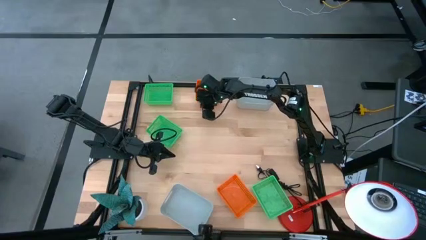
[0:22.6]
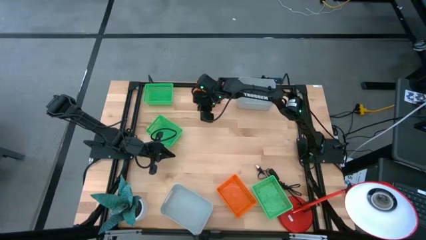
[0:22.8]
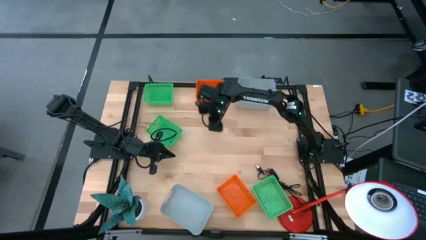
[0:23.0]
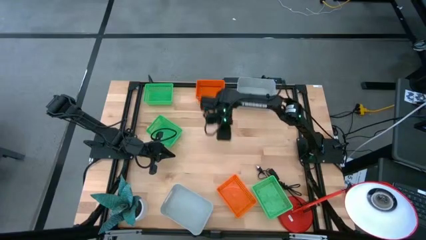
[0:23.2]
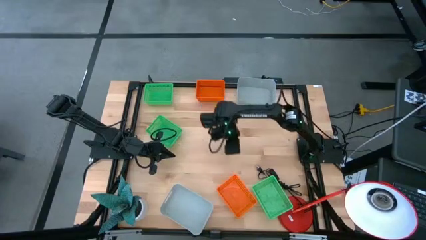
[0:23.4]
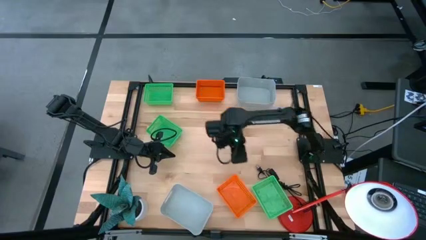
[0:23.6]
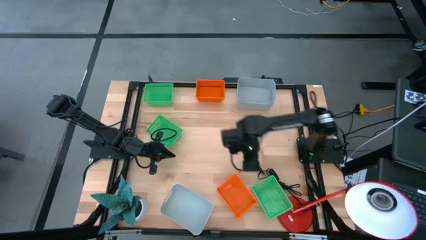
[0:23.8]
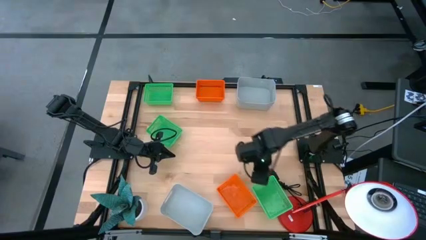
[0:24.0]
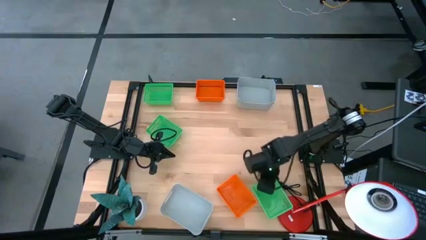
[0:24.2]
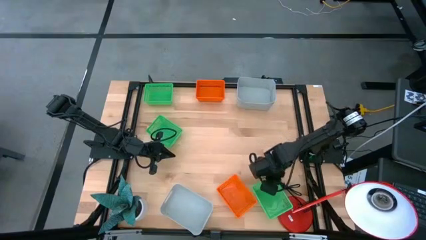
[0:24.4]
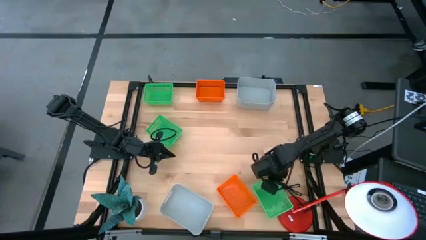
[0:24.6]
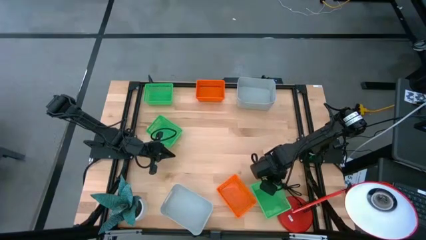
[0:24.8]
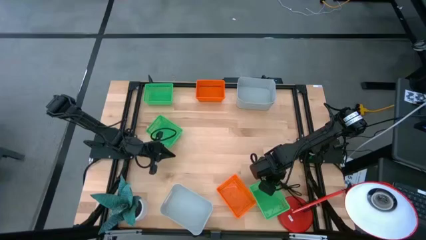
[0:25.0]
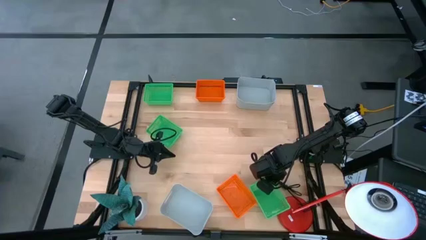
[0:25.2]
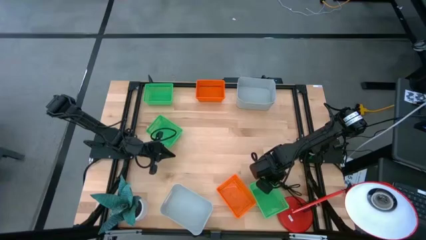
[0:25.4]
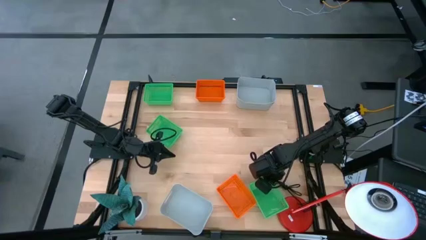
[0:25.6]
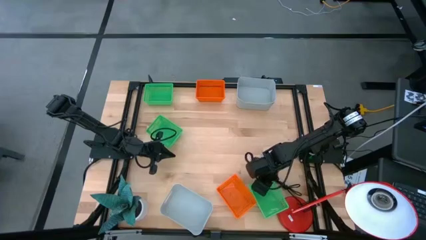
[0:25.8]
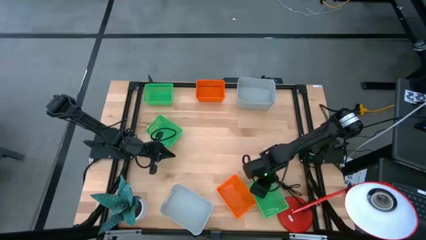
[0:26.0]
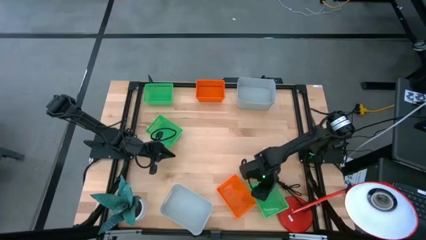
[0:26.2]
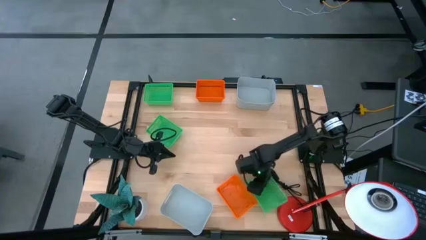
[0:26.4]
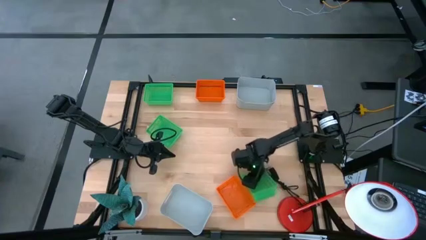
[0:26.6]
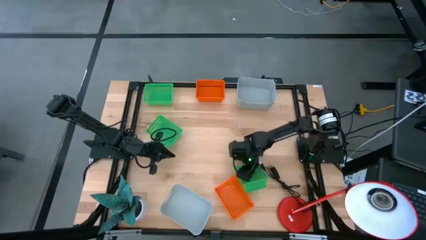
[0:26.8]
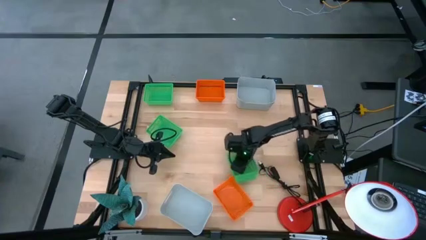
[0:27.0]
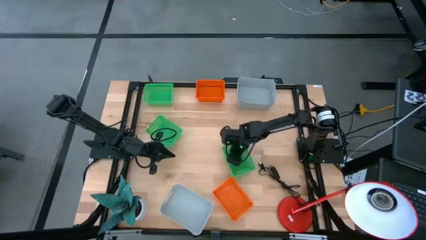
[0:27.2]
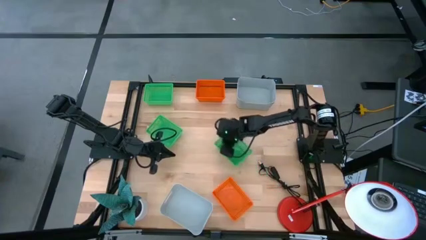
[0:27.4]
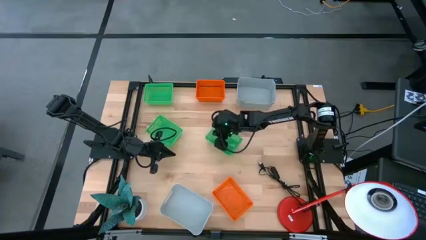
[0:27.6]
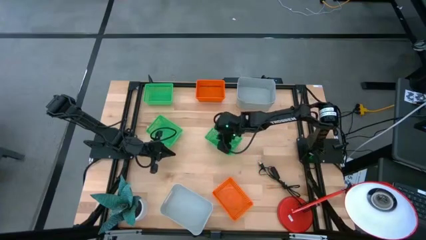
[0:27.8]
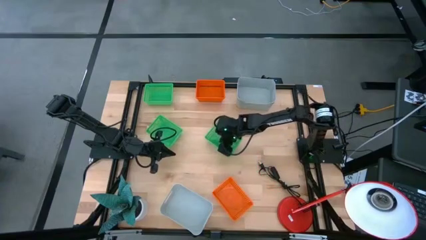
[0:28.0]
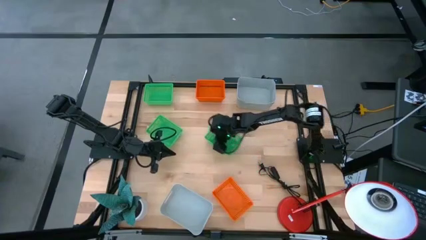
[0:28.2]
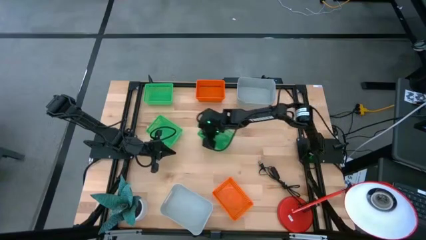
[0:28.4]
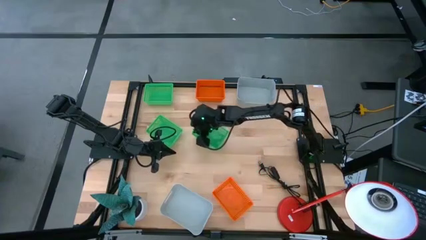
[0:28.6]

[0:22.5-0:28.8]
Adjust the bottom green bin

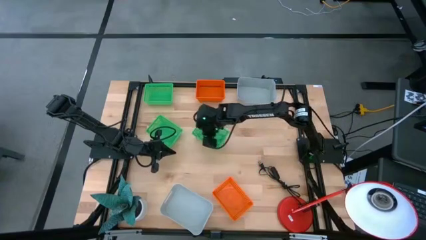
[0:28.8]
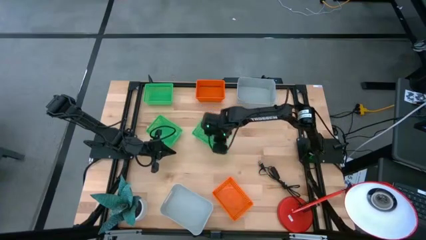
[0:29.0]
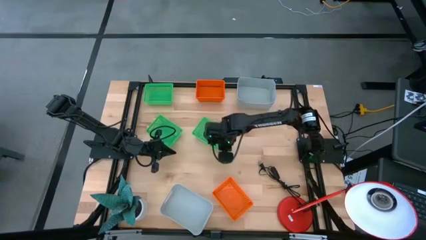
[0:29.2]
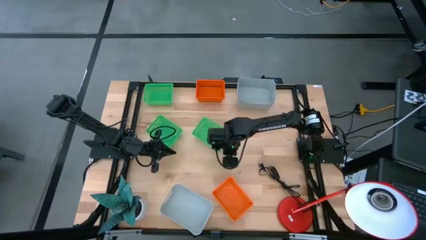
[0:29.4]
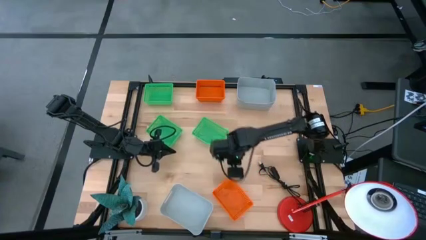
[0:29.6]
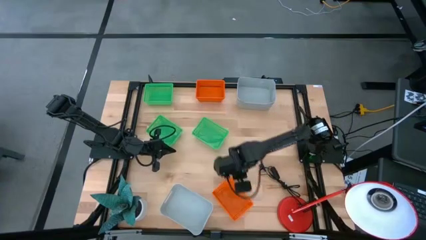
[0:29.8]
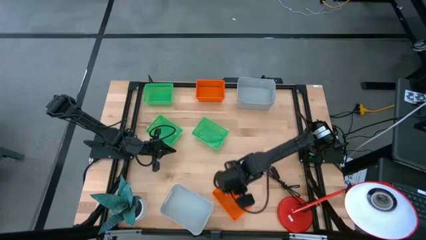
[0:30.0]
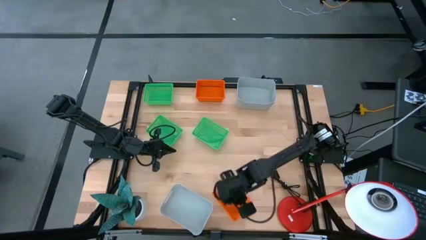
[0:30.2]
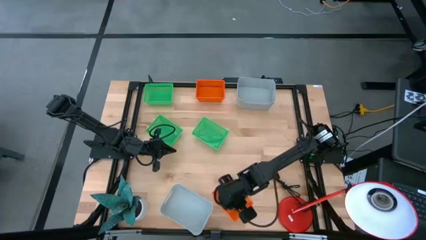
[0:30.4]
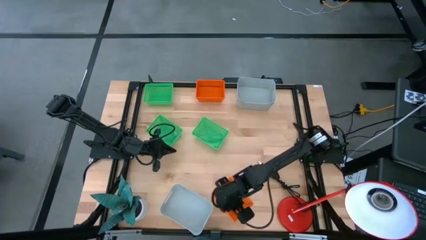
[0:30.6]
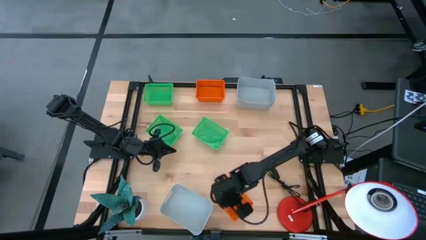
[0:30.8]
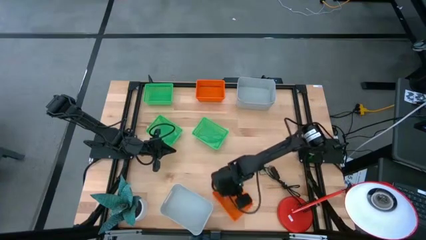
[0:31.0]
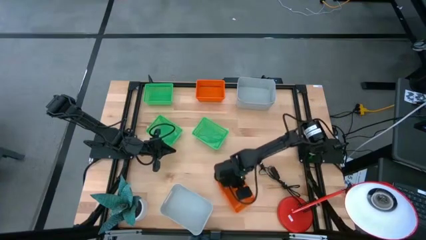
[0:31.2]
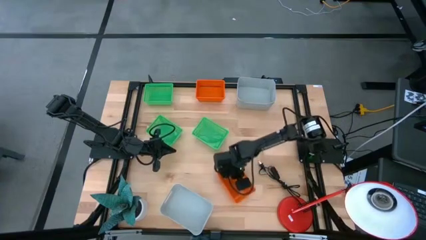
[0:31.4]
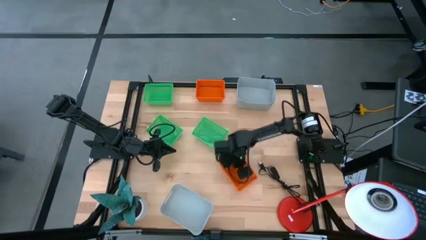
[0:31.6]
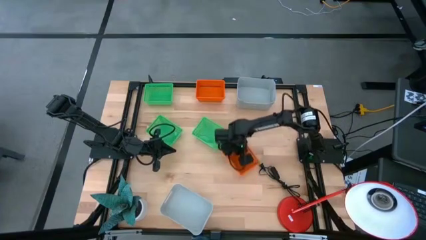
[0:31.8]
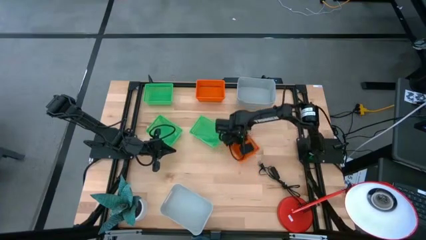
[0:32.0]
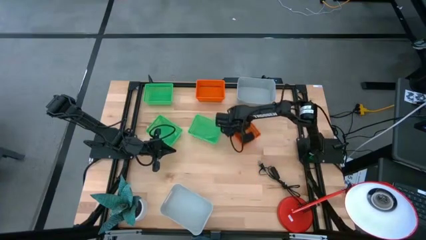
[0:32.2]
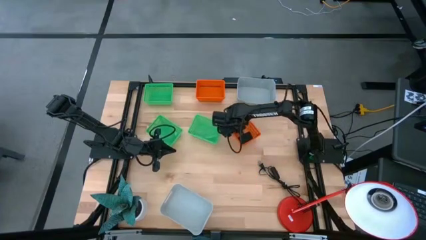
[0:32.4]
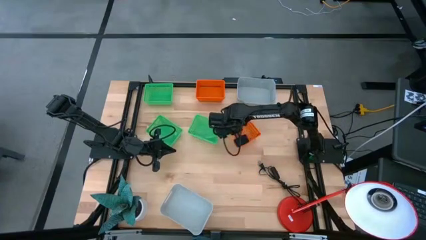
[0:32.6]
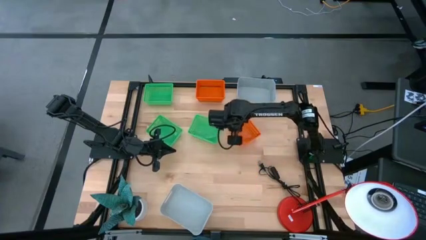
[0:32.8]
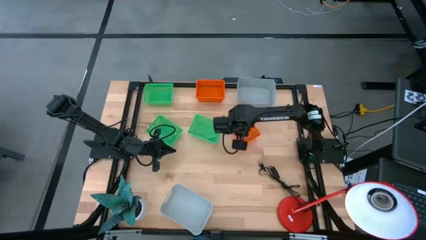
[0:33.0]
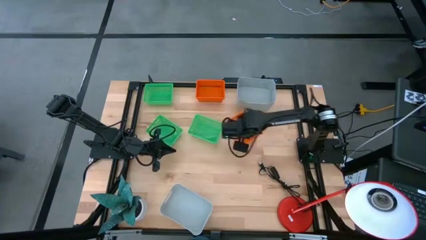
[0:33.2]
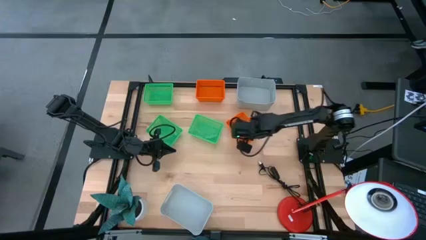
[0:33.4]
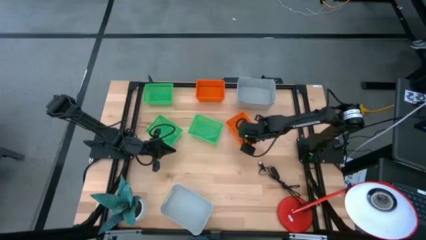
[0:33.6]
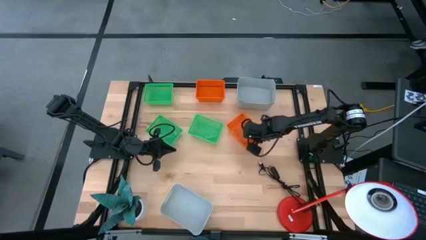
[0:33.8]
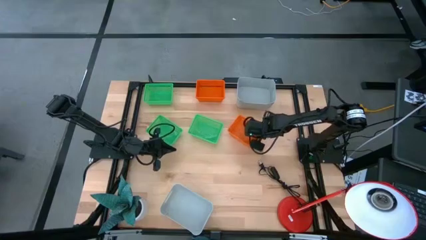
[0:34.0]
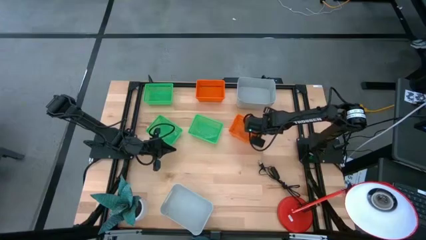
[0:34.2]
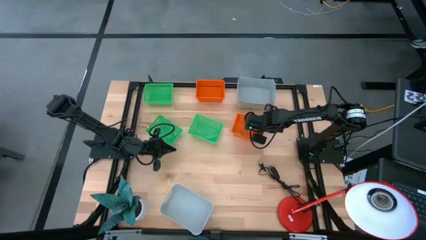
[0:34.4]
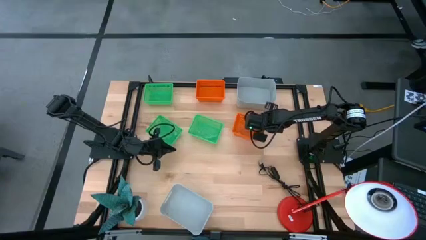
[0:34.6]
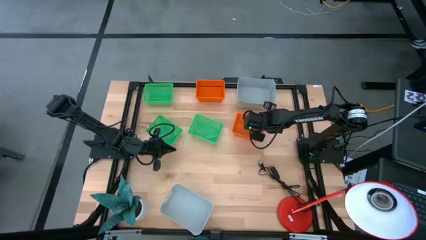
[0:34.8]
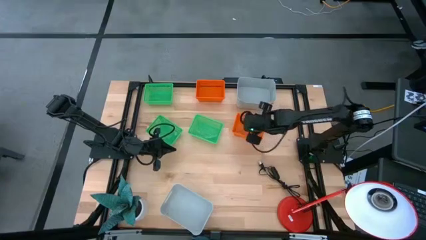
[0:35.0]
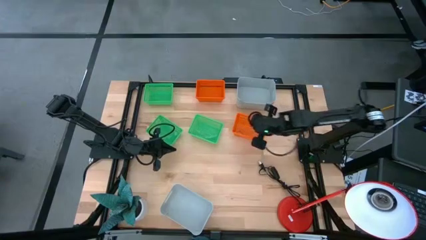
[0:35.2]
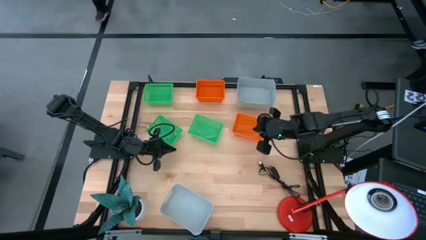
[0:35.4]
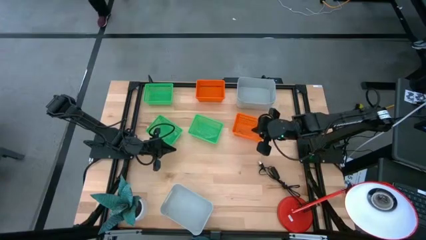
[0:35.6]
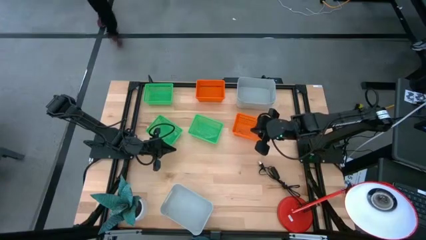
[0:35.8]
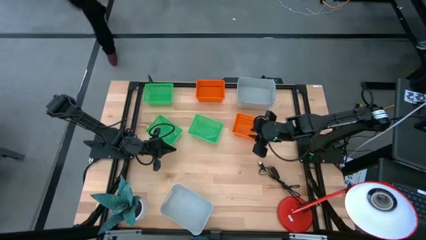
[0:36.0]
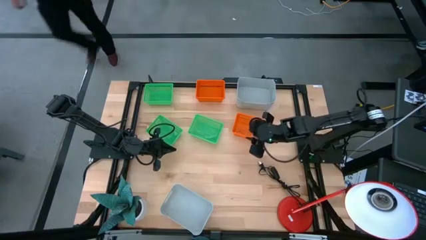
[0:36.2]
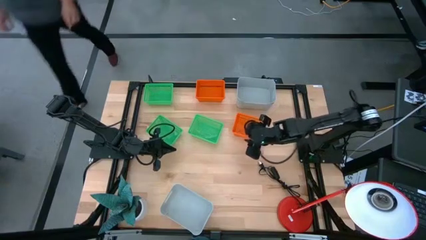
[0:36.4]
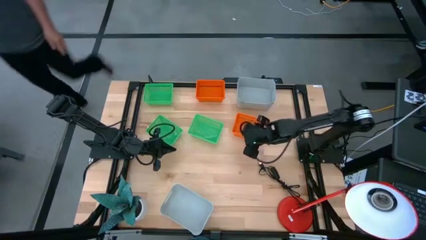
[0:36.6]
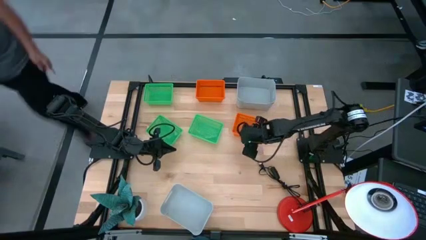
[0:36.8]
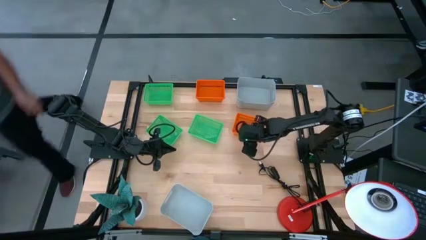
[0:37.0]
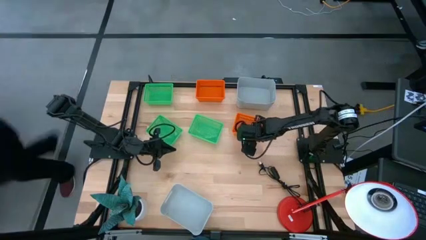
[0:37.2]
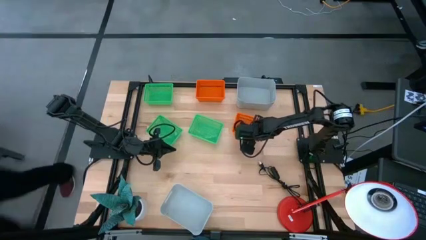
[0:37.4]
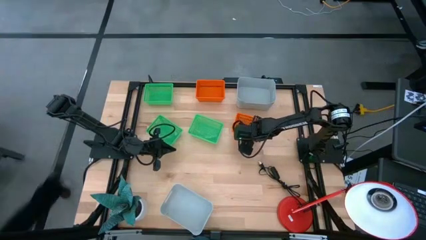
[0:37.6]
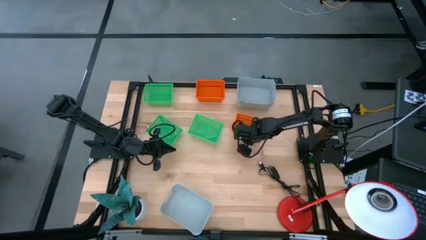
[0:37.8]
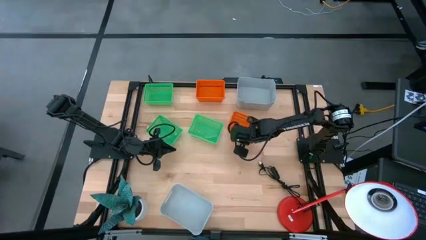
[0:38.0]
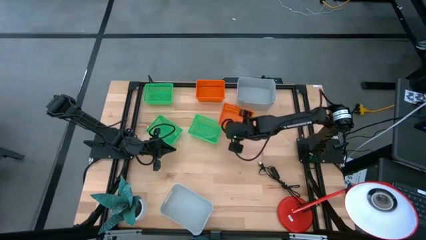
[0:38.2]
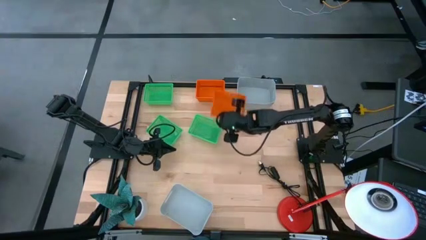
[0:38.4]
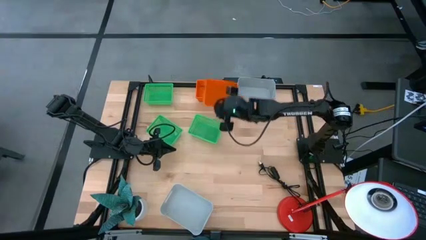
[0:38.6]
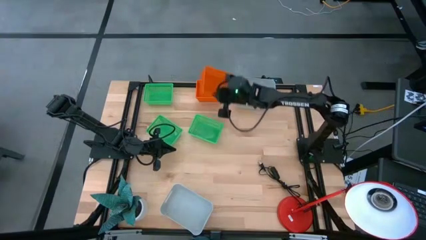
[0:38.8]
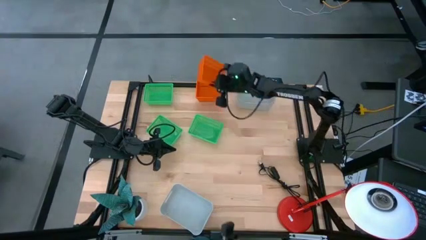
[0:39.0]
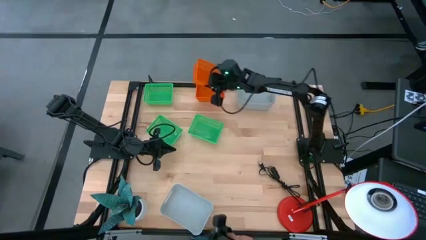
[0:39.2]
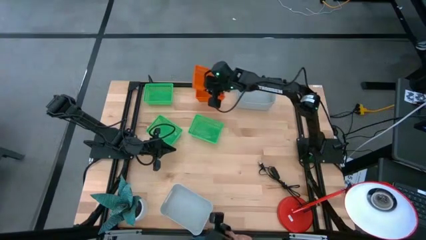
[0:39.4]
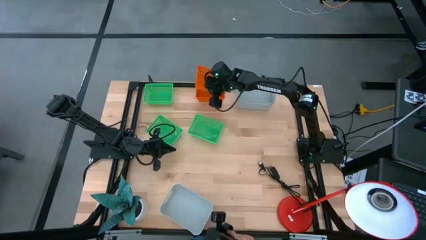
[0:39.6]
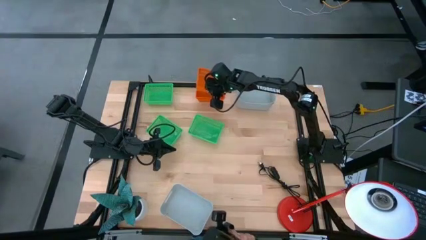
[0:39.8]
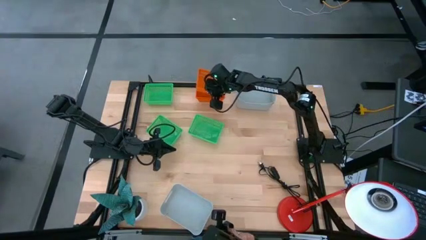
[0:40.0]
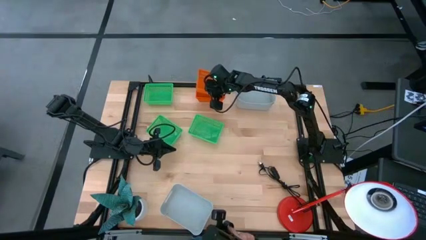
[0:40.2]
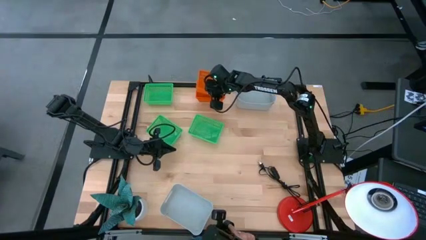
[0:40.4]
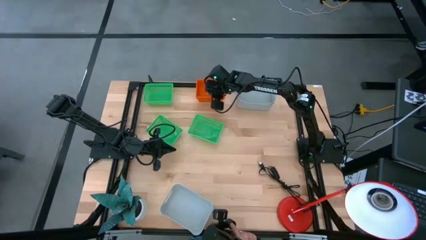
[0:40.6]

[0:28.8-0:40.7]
Stack the bottom orange bin on top of the top orange bin
